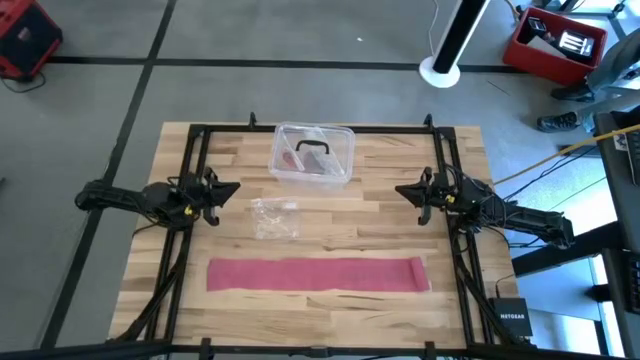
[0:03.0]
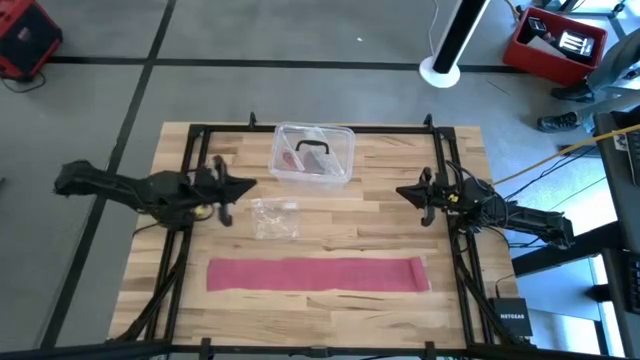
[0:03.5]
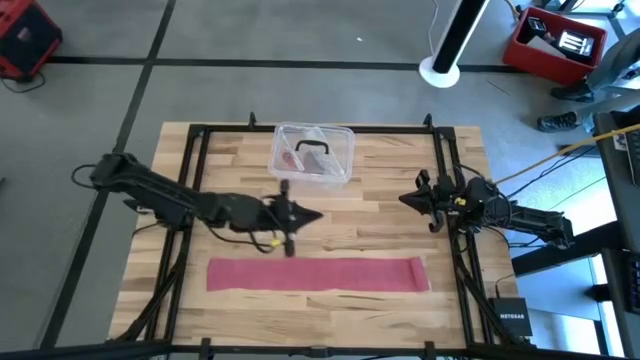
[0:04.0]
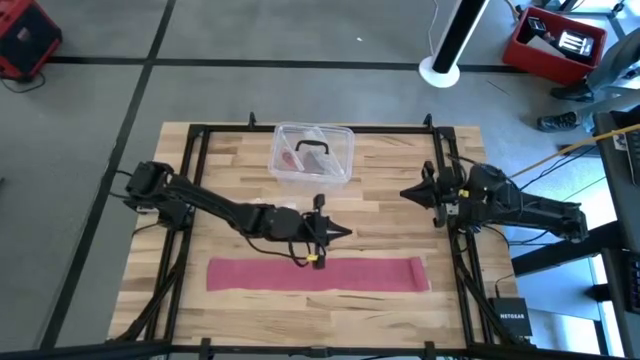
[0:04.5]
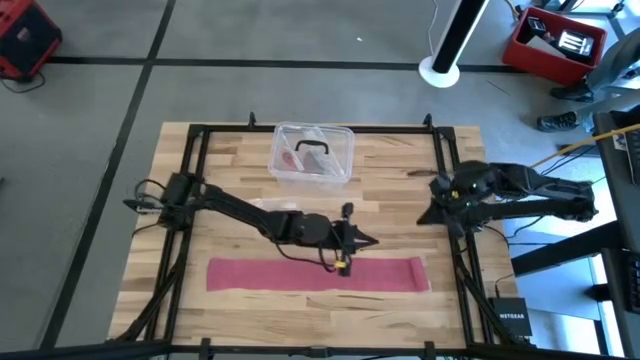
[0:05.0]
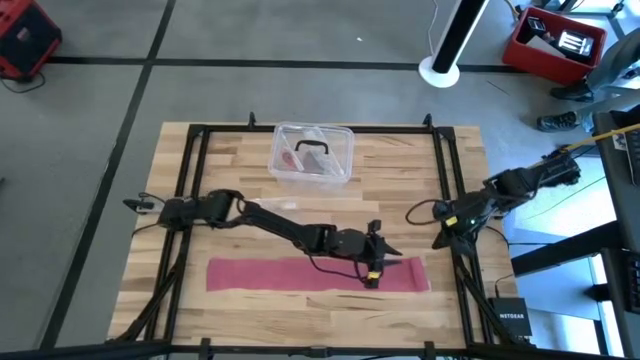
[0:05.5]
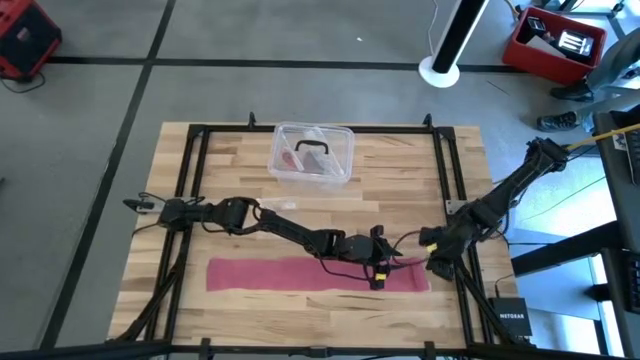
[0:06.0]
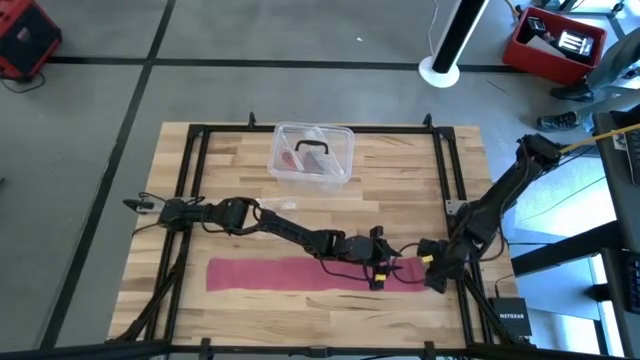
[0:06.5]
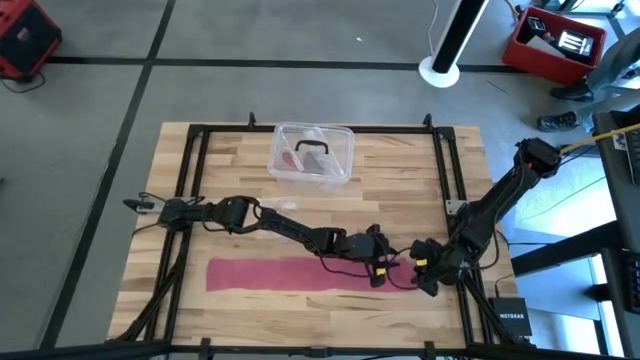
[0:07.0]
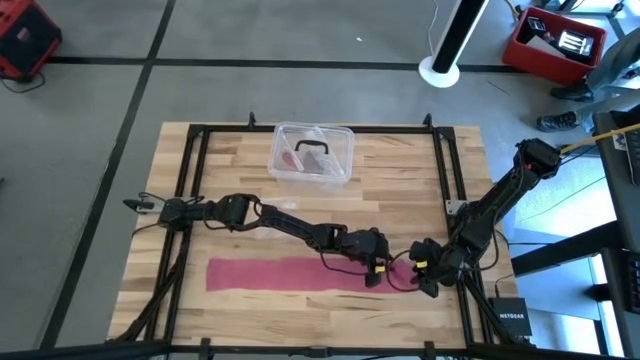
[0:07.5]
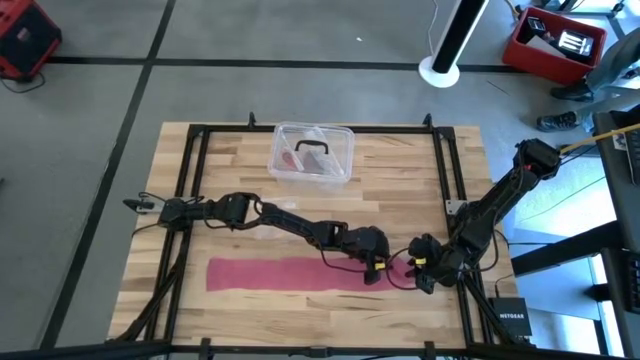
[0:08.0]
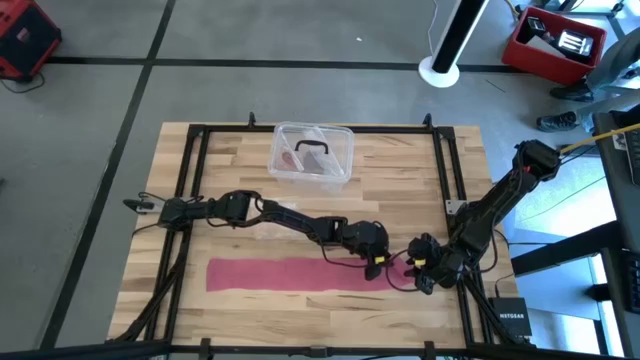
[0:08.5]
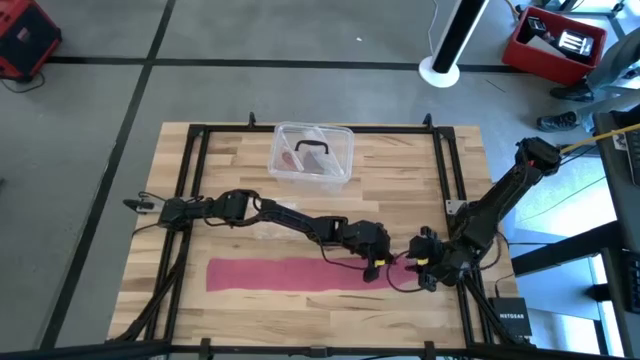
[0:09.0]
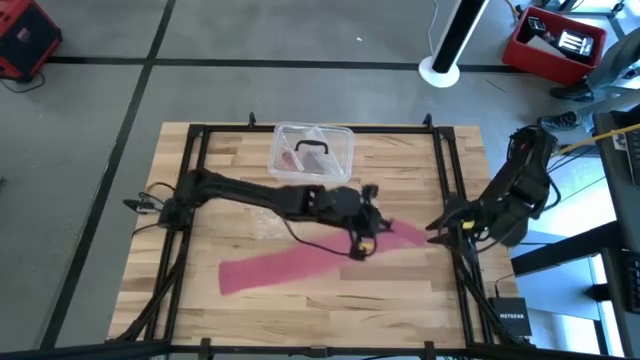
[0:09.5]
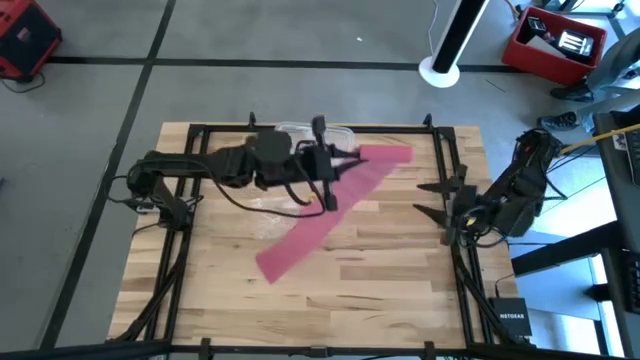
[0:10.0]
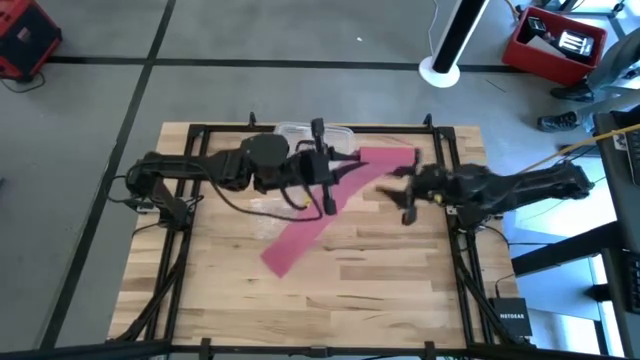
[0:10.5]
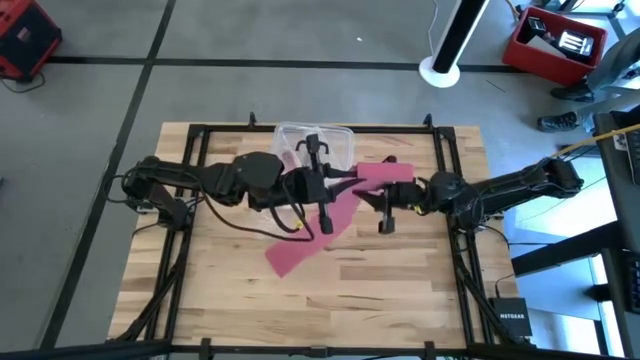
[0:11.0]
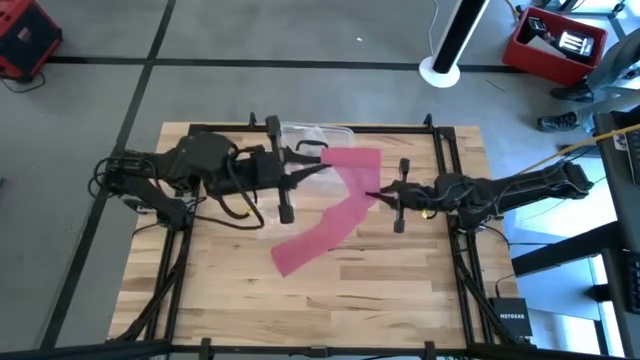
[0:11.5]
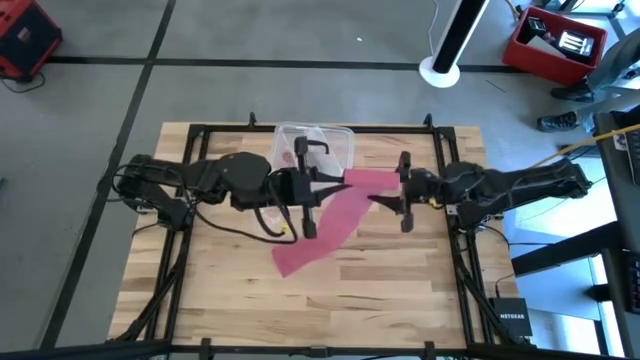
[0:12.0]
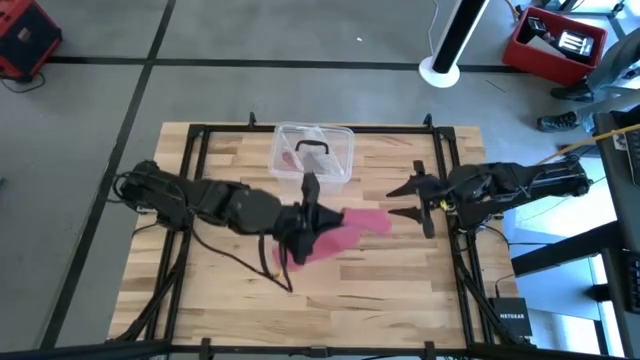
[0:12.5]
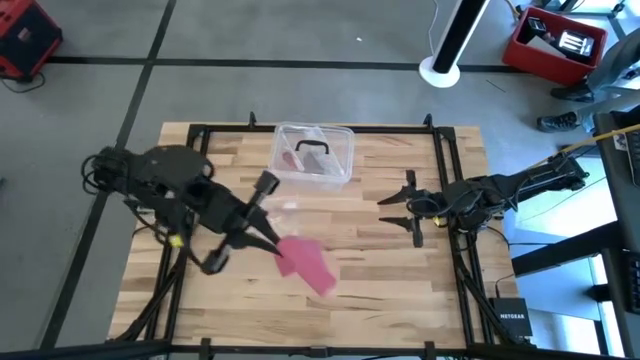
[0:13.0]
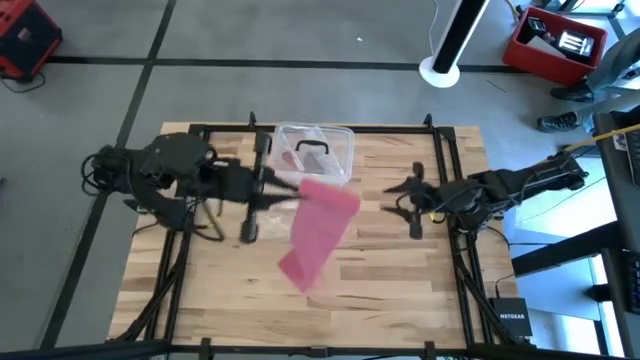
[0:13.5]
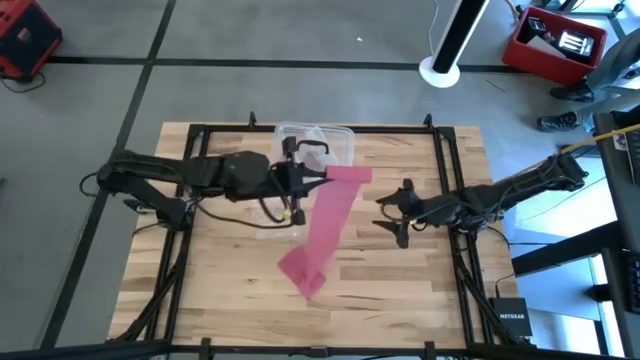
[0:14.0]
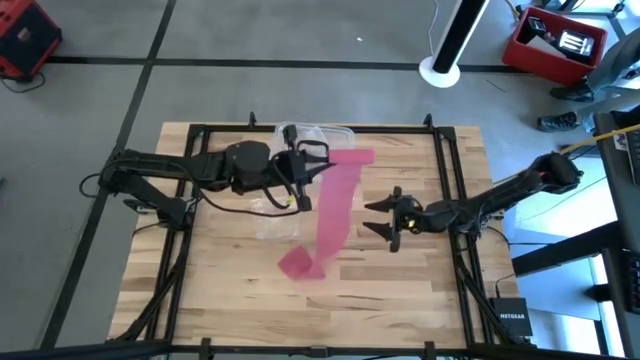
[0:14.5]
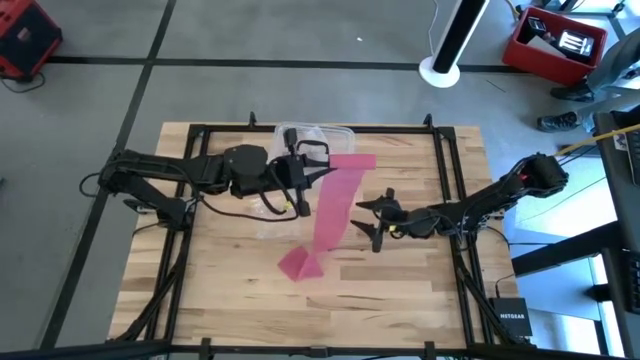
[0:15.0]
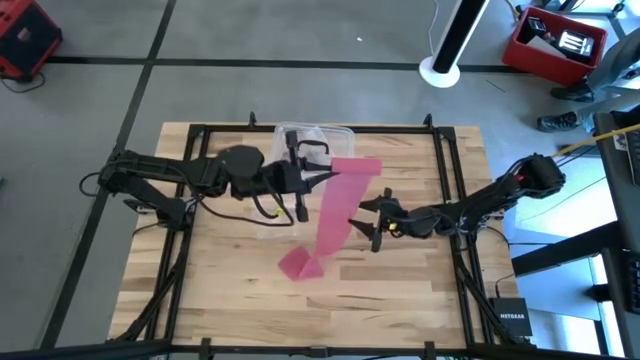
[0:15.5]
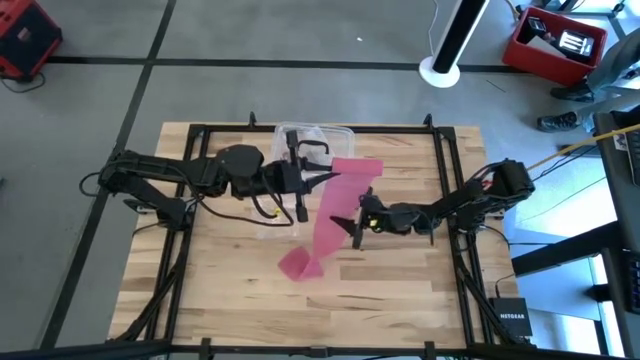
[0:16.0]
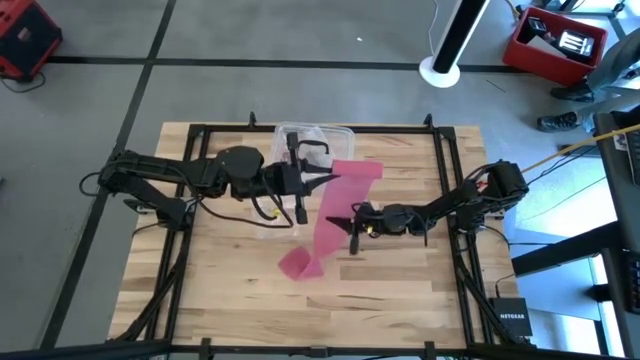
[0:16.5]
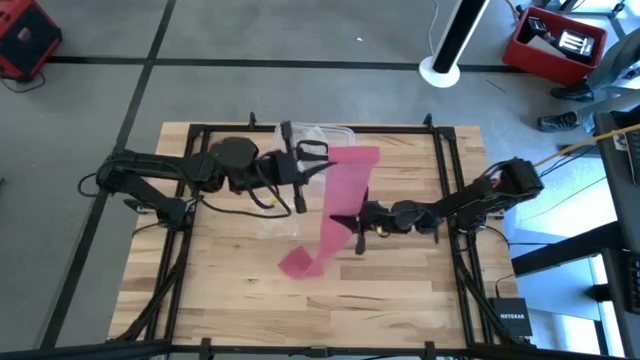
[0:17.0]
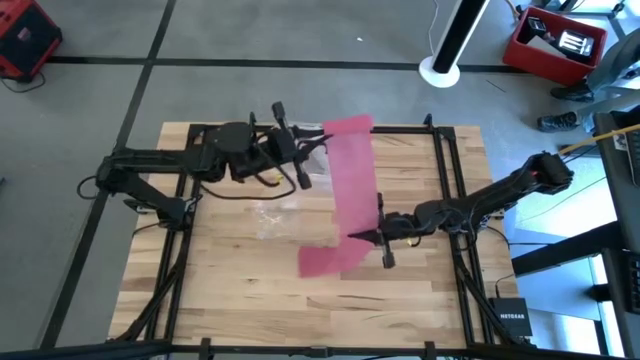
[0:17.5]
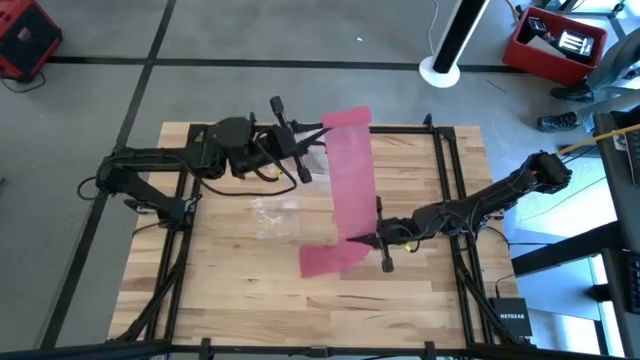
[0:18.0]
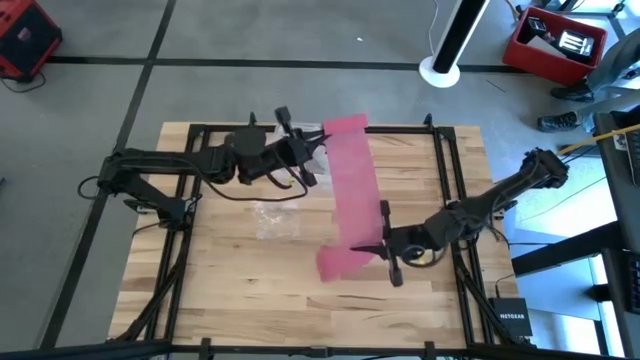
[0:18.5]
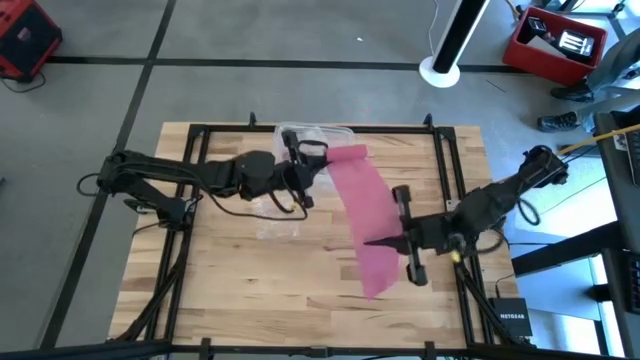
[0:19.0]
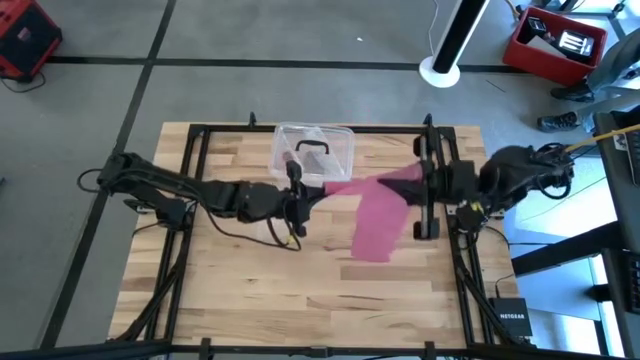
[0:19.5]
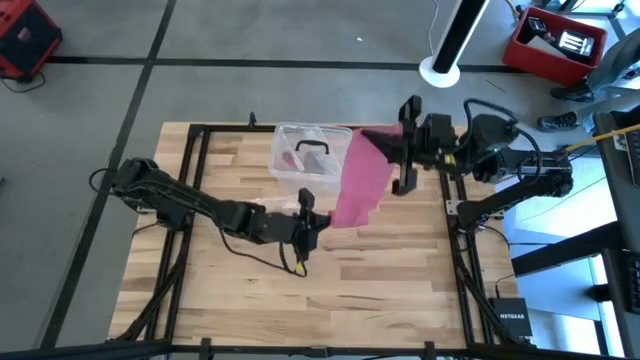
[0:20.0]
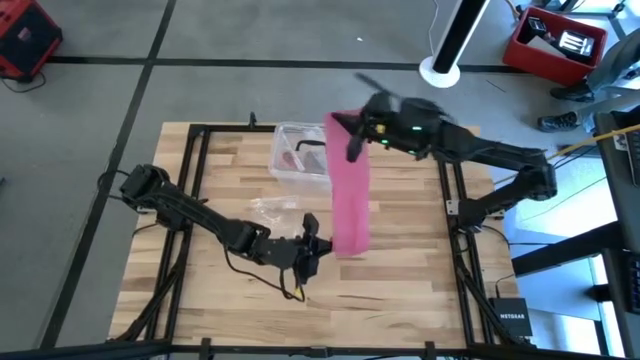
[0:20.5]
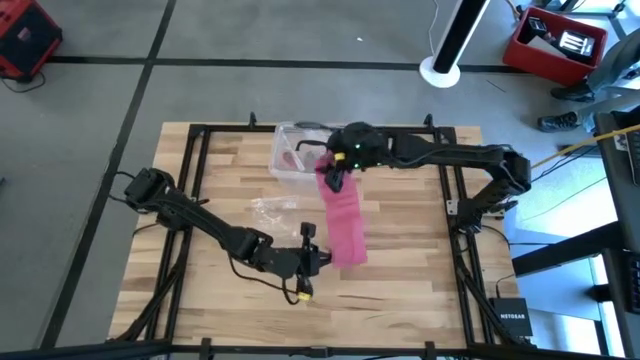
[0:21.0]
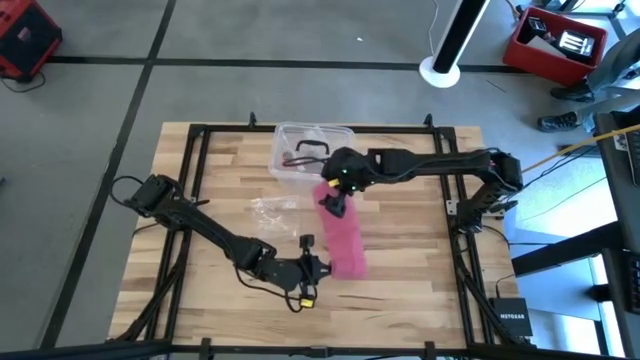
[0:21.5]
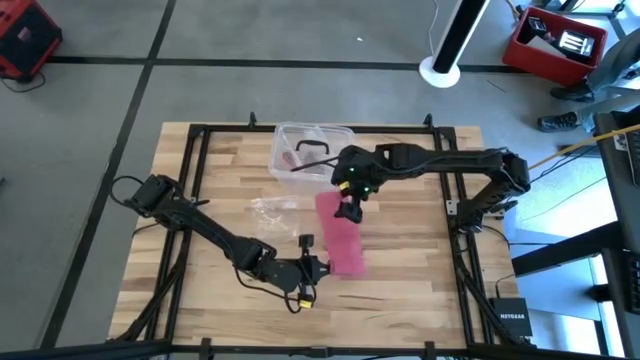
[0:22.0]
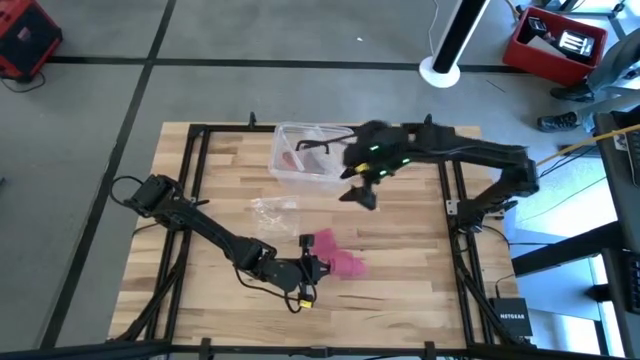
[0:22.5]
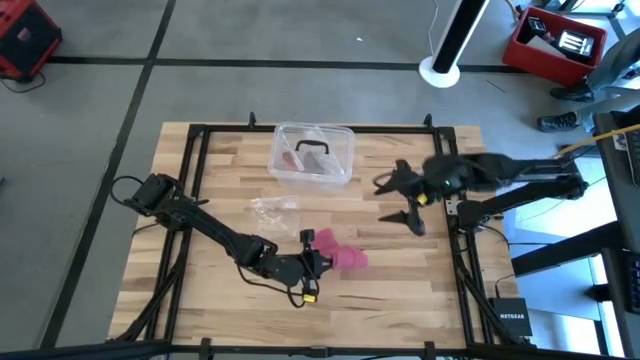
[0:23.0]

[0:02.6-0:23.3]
Task: Roll bandage
Roll the pink bandage
